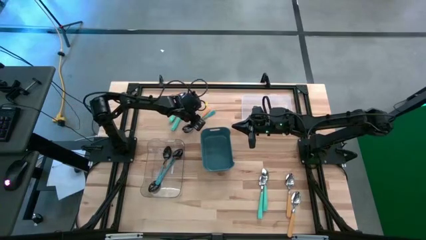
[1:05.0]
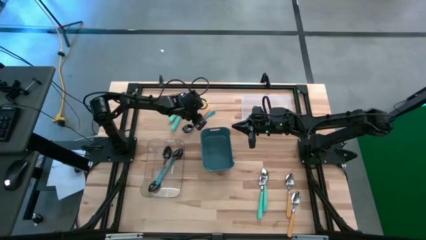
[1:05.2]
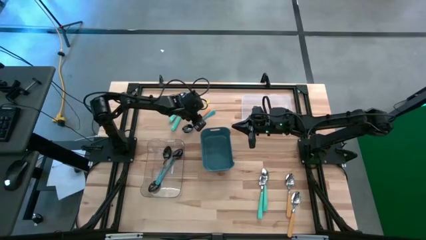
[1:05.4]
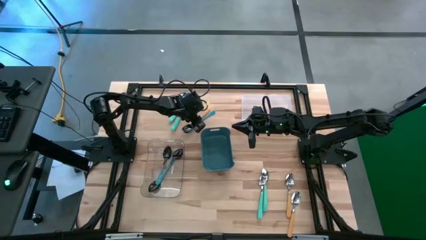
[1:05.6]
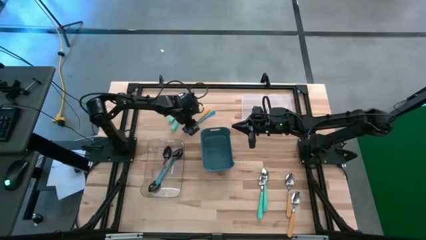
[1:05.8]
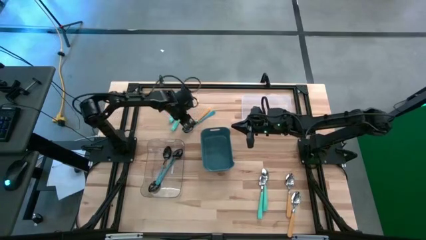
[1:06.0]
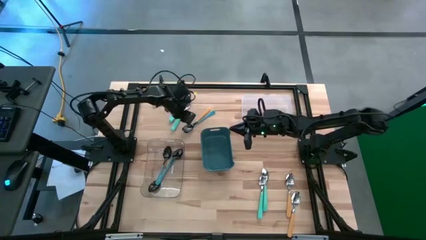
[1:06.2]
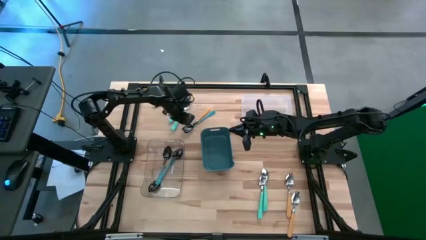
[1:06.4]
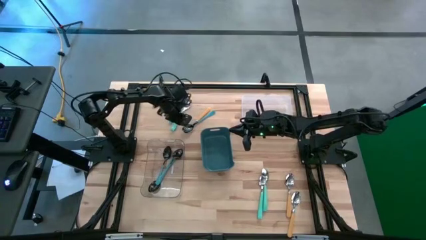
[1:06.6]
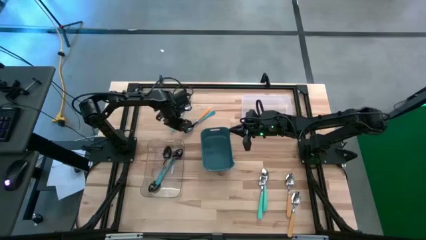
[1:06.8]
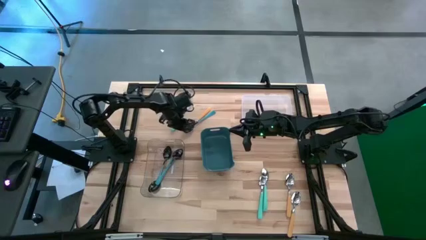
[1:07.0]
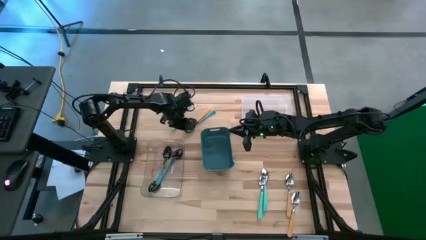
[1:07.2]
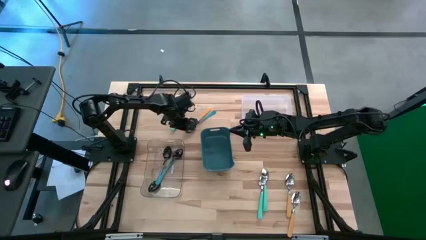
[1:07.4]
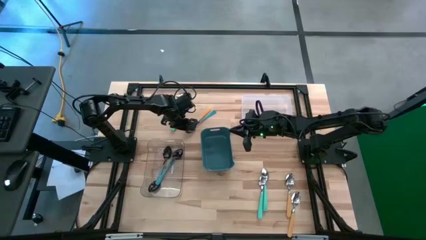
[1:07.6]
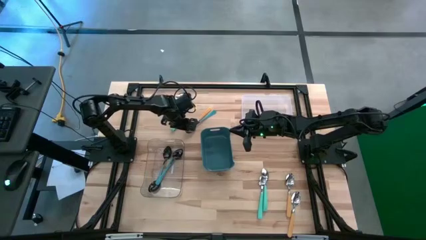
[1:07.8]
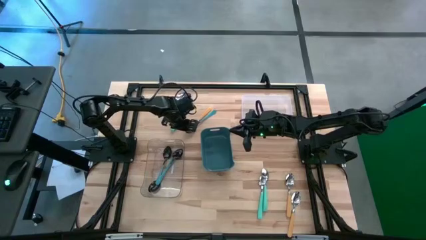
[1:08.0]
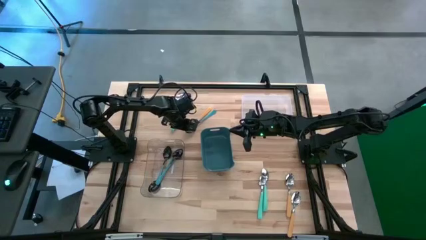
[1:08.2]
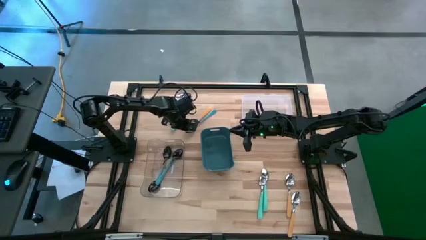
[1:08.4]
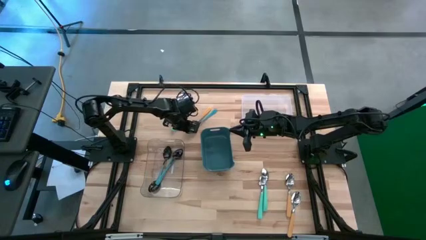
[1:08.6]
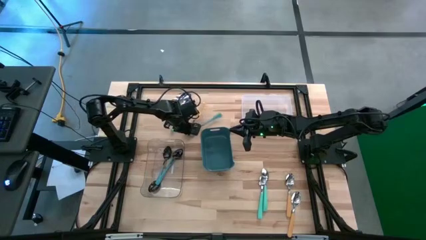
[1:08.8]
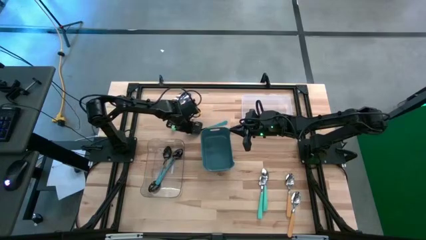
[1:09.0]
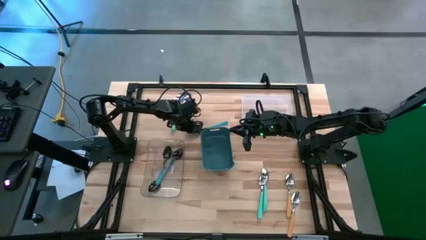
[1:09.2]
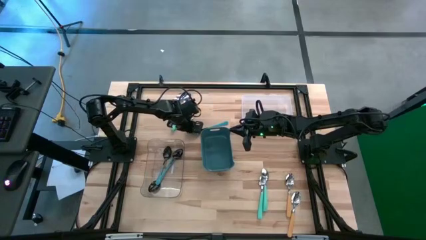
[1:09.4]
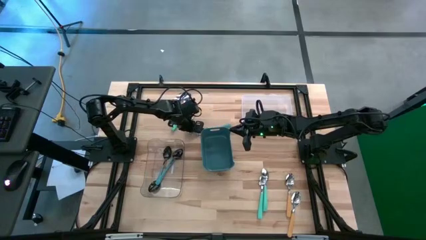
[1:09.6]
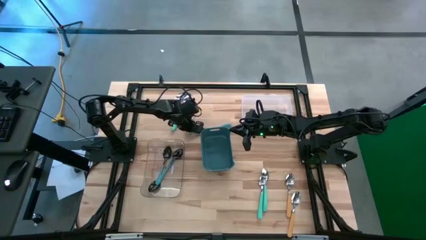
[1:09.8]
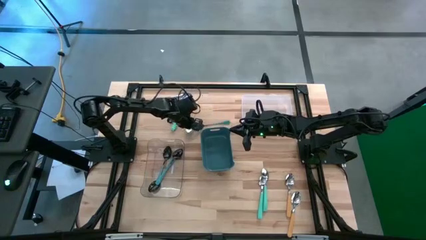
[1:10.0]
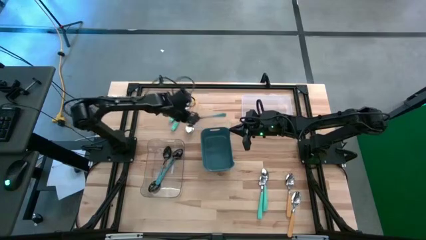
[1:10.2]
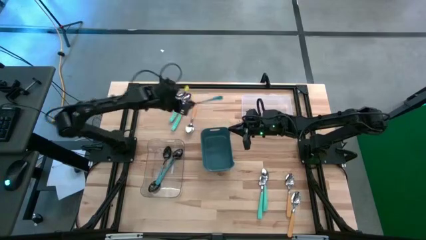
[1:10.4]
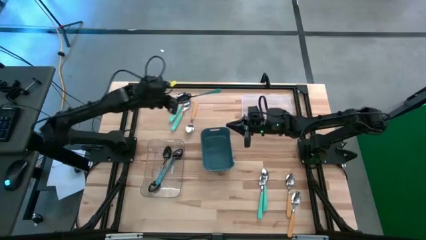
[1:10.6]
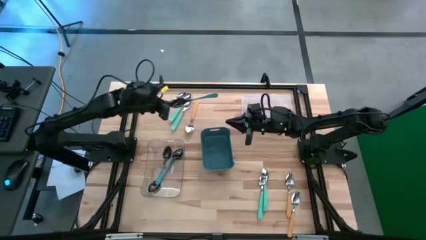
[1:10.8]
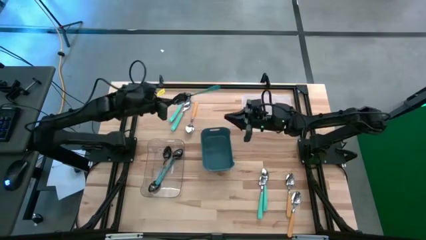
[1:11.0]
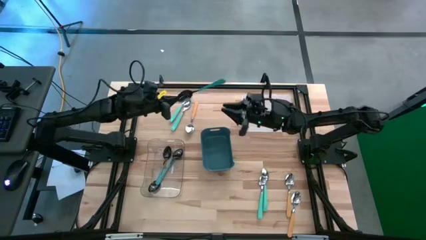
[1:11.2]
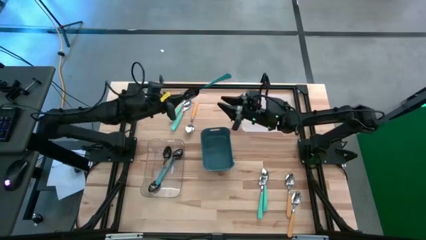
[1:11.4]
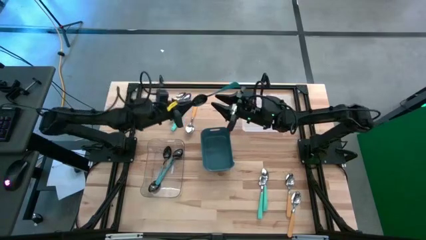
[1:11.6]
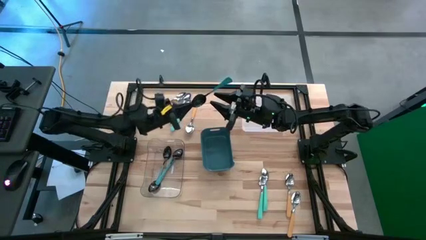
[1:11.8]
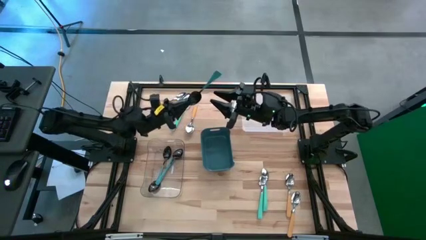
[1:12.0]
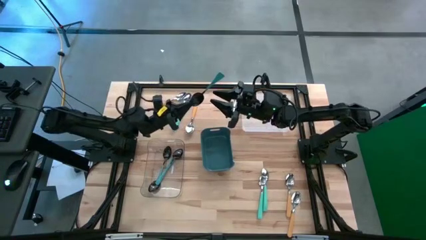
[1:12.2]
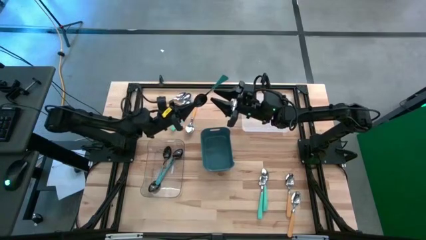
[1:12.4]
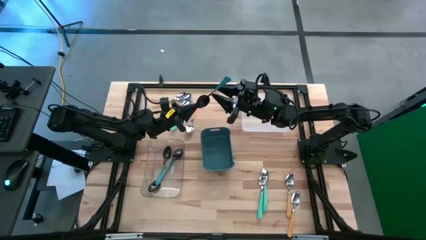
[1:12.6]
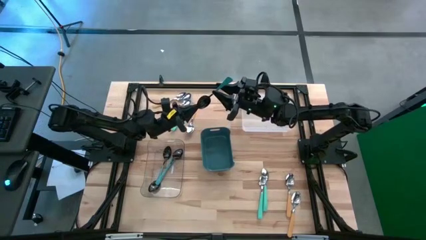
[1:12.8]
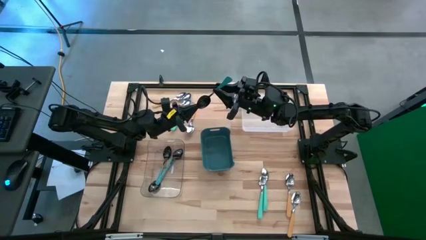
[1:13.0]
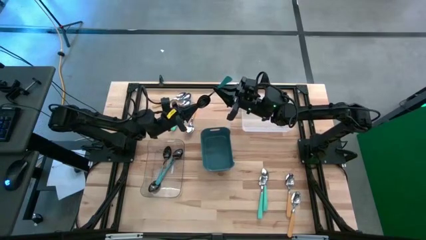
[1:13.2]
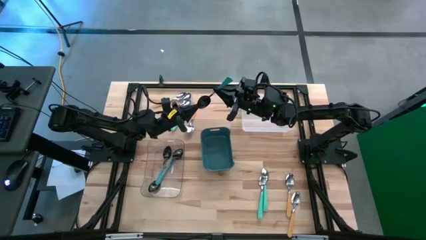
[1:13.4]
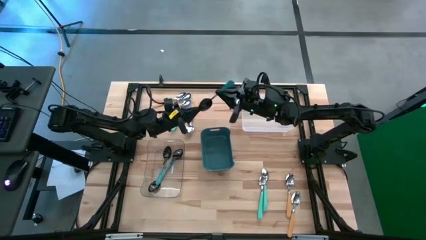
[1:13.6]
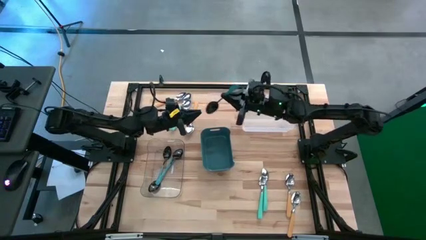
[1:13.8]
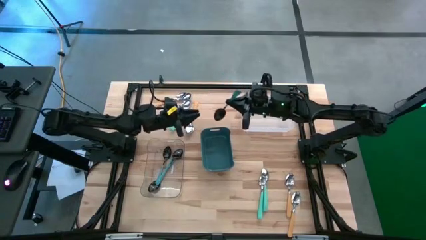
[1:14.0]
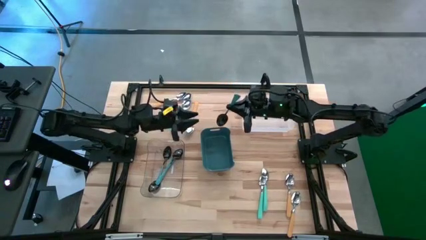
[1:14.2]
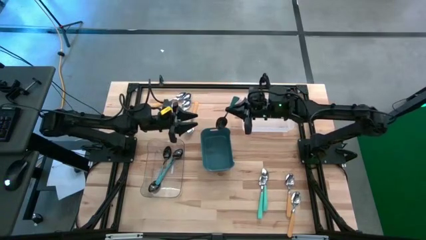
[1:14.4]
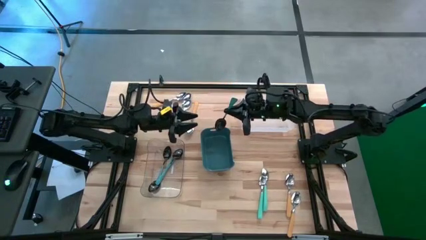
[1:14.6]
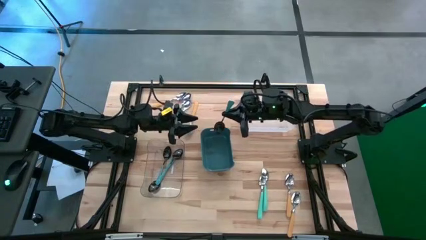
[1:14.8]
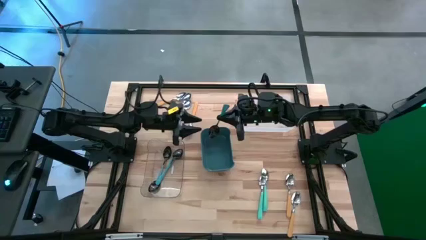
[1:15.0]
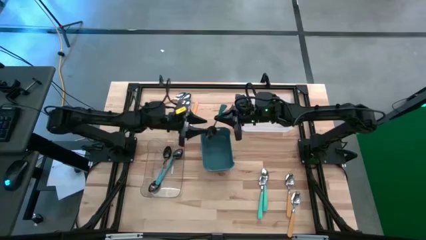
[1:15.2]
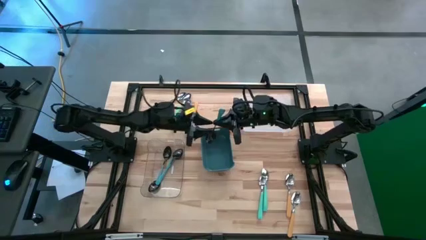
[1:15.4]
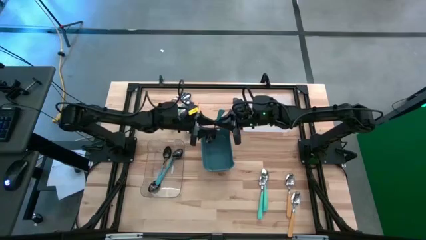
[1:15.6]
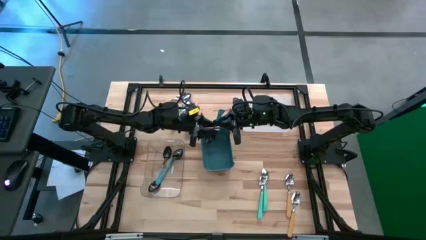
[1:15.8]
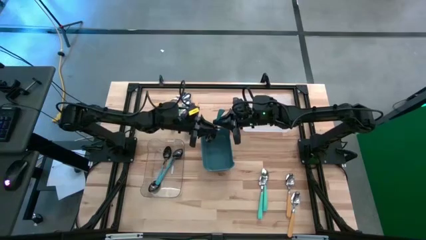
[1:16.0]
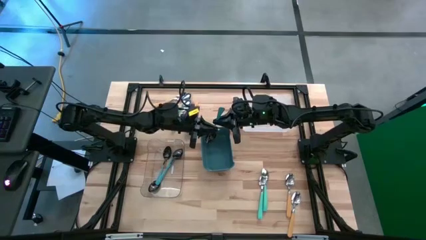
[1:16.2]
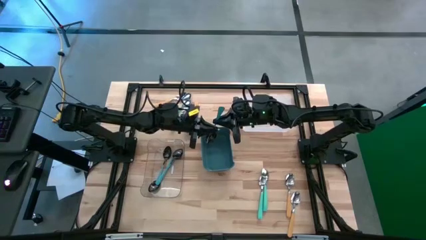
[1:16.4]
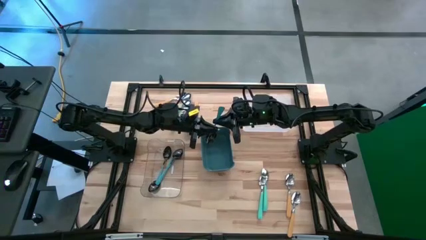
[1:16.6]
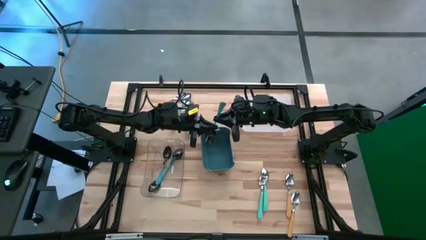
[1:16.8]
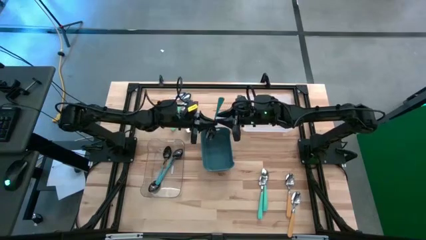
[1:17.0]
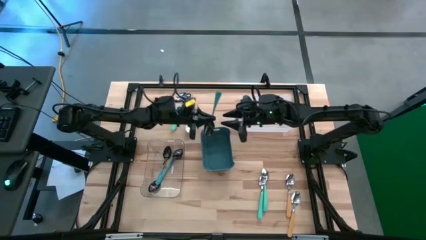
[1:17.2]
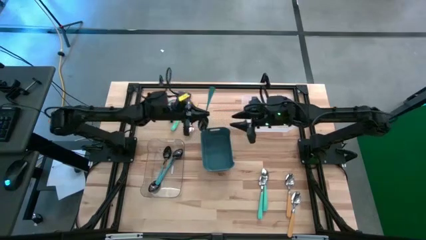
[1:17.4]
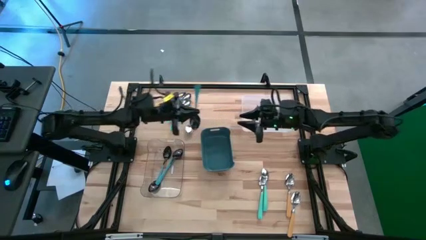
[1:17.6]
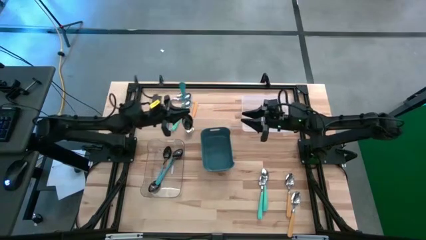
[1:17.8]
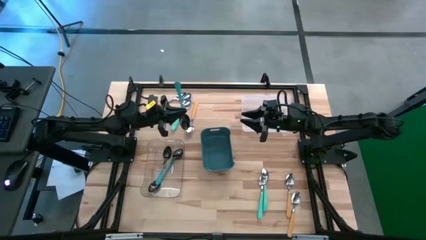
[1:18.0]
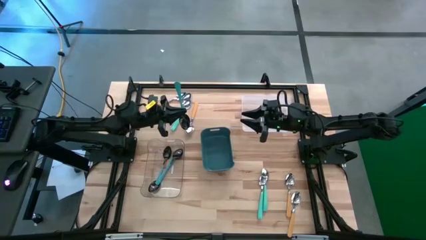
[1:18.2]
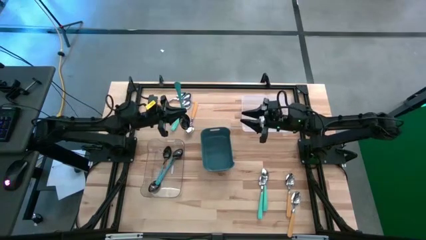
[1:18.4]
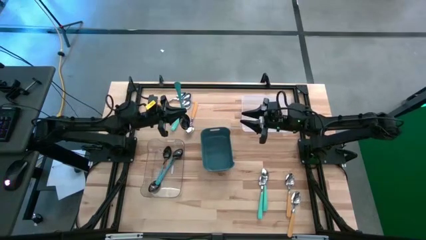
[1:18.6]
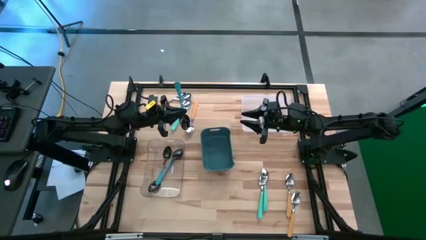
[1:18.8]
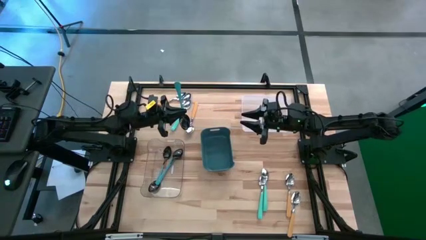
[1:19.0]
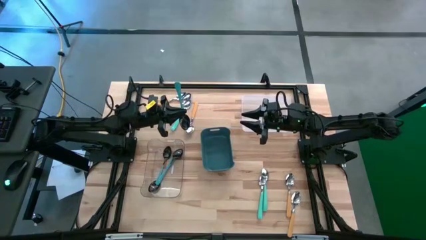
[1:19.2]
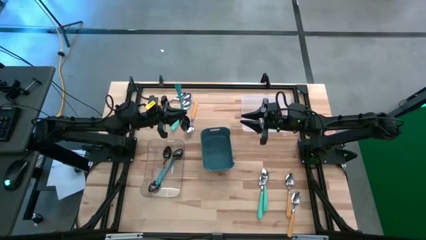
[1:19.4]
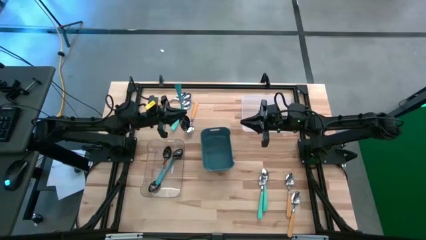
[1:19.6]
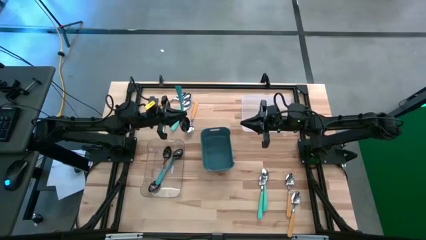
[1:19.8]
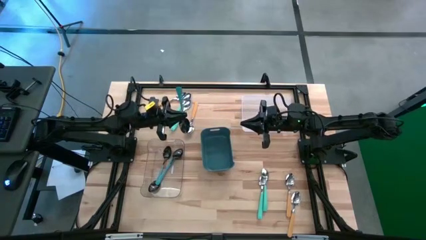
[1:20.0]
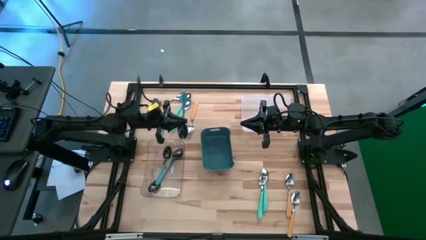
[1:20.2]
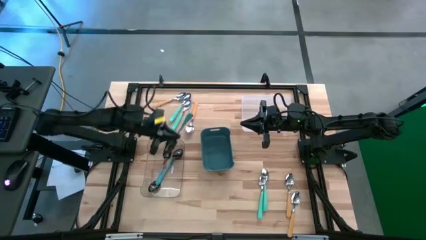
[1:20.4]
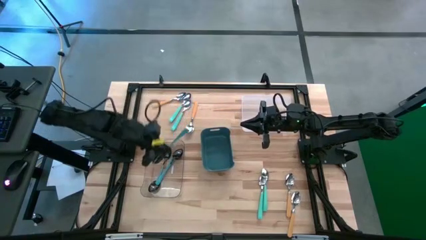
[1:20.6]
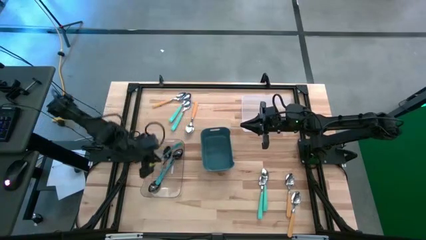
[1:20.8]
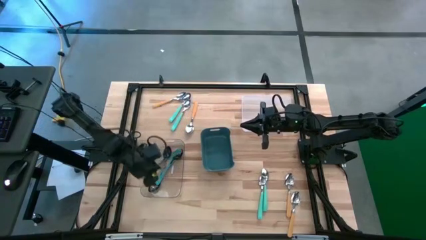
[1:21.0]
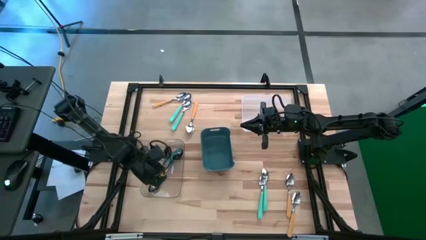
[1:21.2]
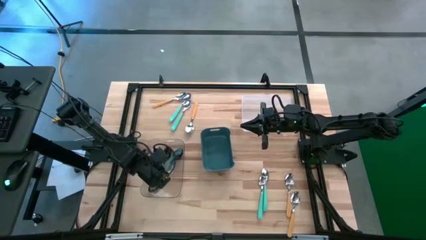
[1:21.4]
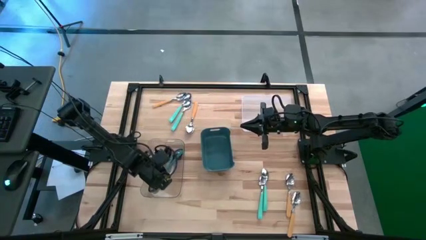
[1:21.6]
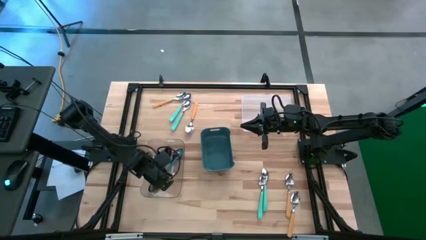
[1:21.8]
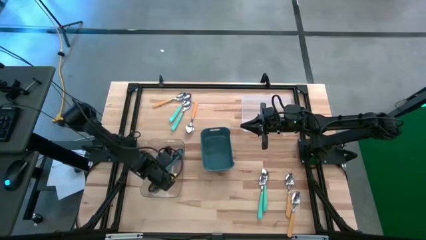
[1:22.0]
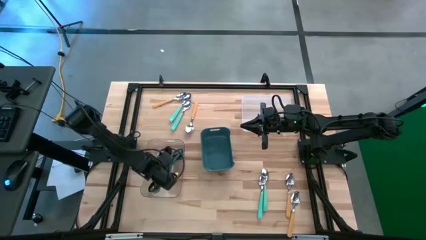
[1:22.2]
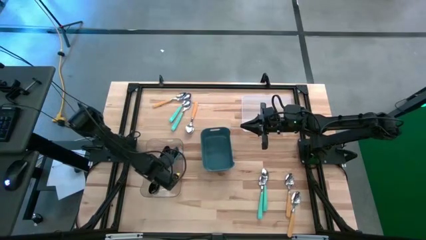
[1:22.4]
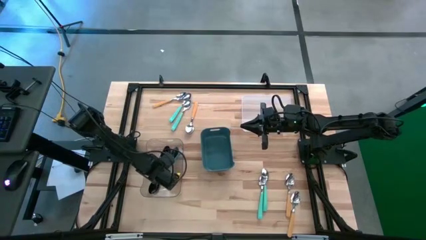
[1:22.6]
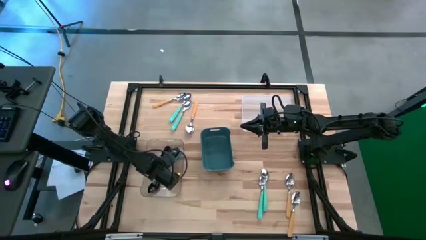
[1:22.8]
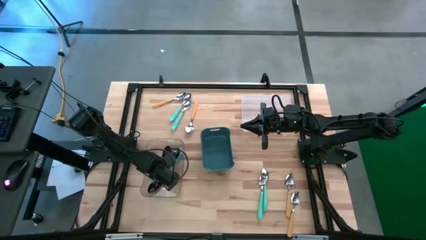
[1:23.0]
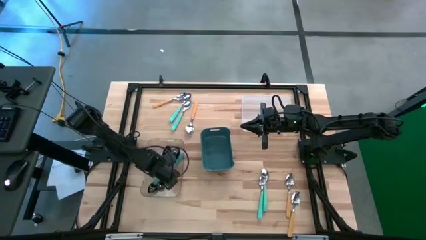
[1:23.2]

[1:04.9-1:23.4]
Task: Sort silverware by color (type)
Put the blue spoon into the transparent bin
